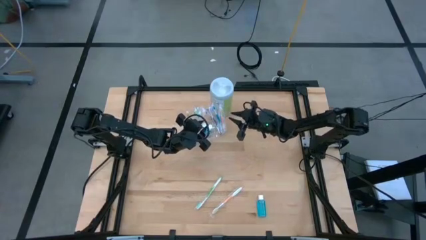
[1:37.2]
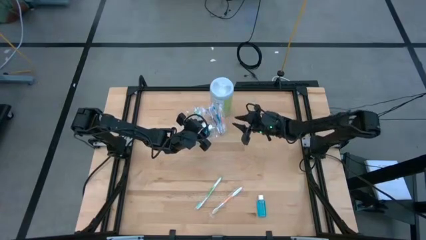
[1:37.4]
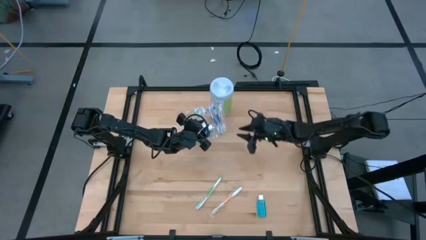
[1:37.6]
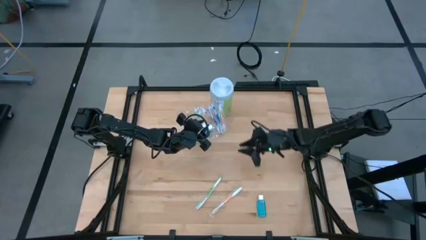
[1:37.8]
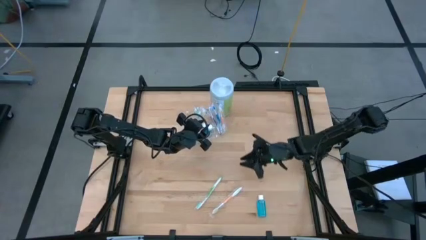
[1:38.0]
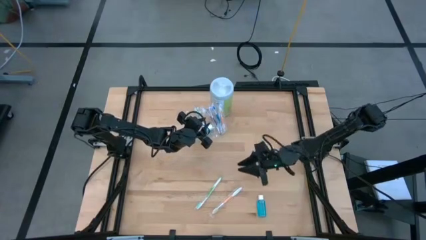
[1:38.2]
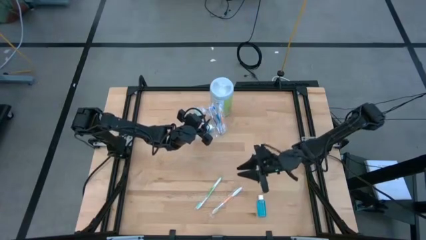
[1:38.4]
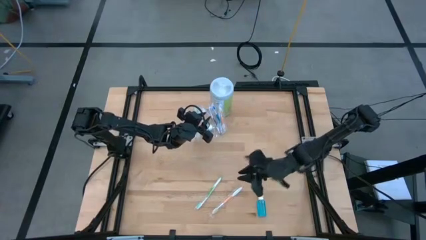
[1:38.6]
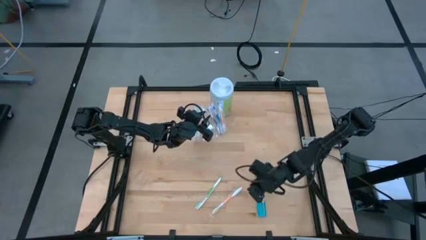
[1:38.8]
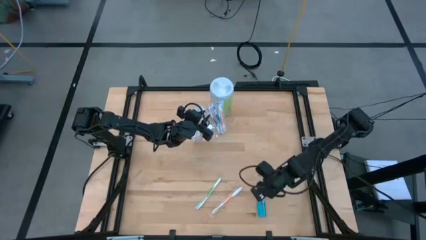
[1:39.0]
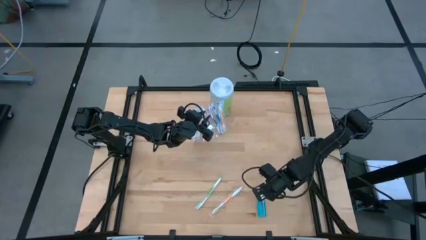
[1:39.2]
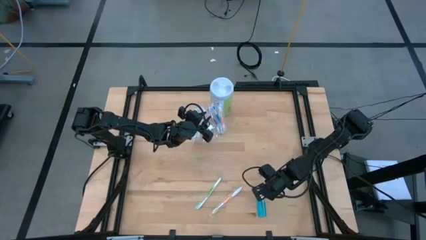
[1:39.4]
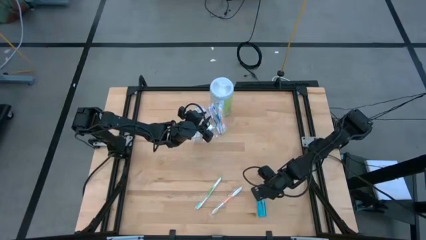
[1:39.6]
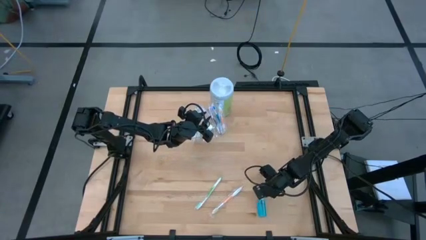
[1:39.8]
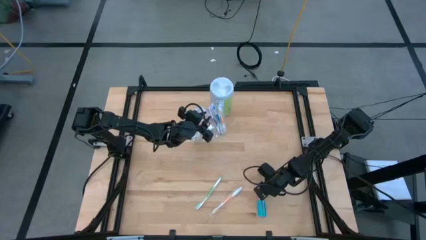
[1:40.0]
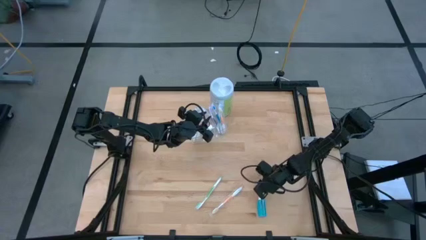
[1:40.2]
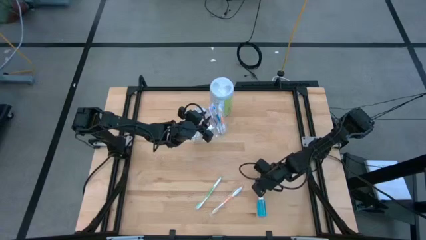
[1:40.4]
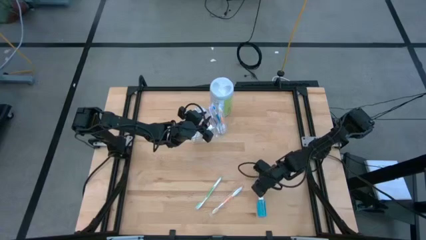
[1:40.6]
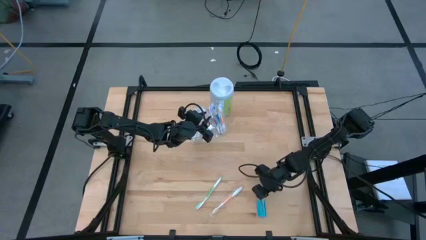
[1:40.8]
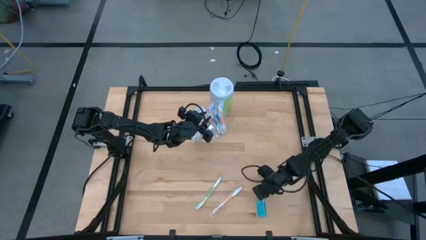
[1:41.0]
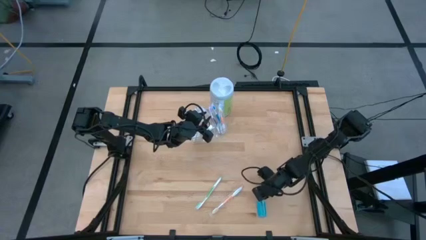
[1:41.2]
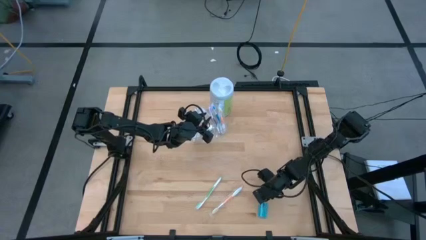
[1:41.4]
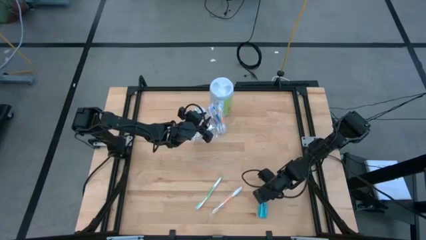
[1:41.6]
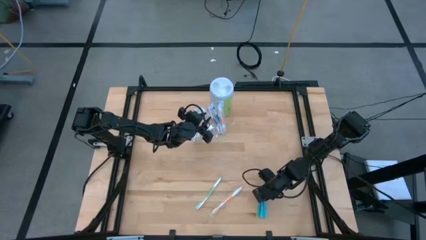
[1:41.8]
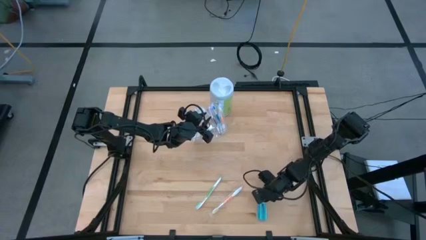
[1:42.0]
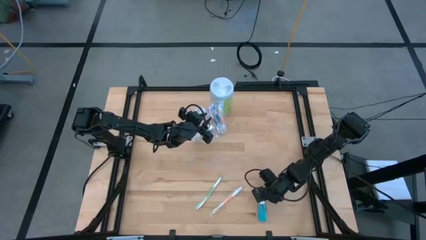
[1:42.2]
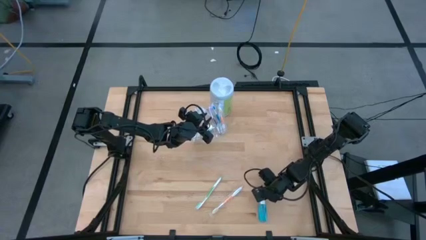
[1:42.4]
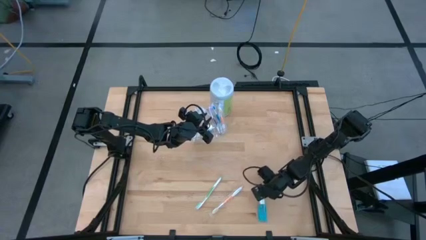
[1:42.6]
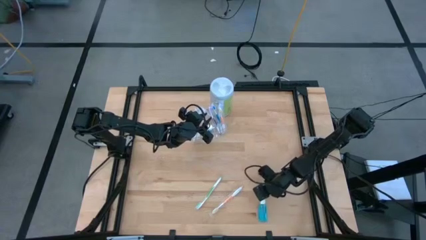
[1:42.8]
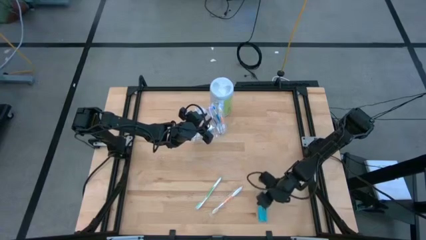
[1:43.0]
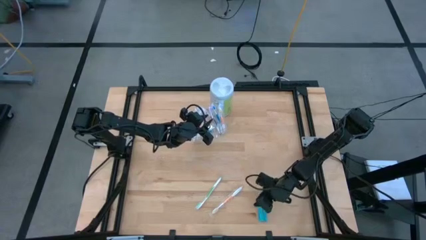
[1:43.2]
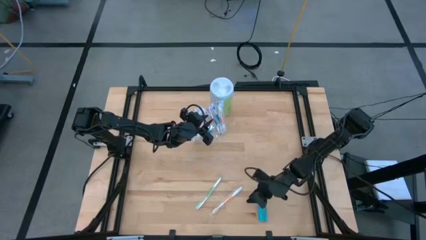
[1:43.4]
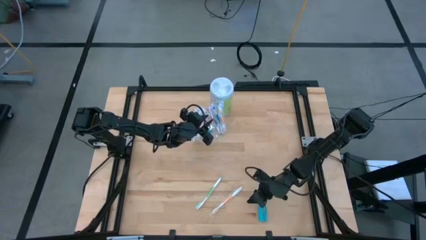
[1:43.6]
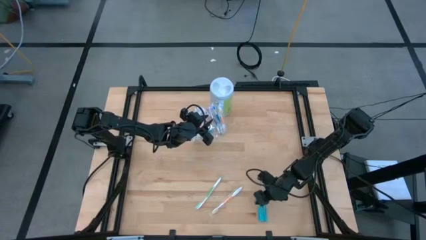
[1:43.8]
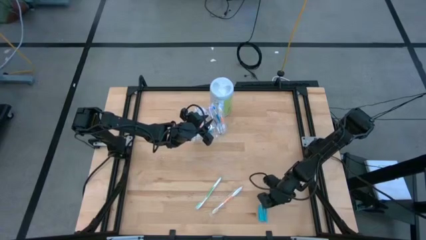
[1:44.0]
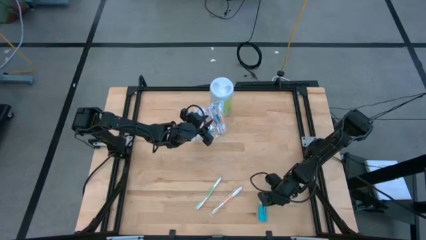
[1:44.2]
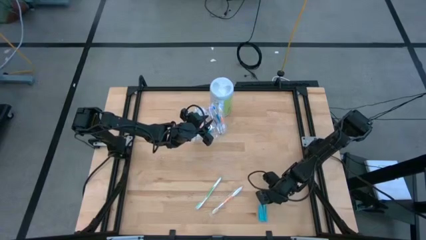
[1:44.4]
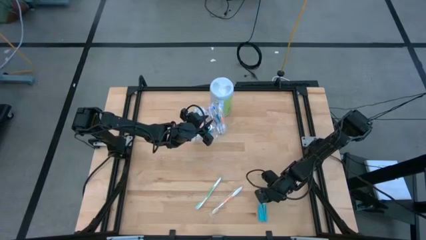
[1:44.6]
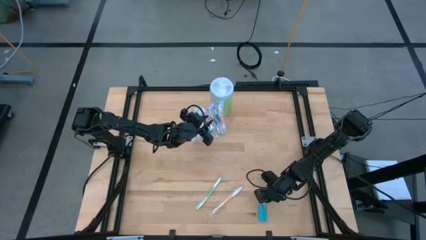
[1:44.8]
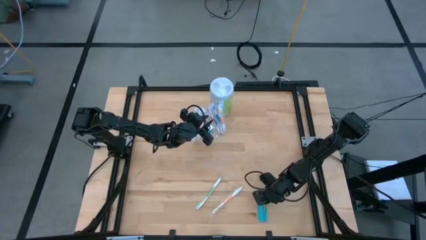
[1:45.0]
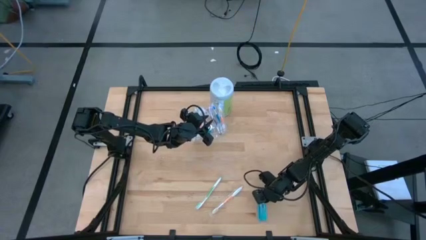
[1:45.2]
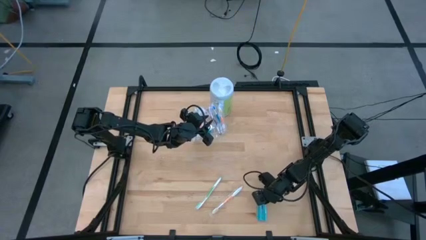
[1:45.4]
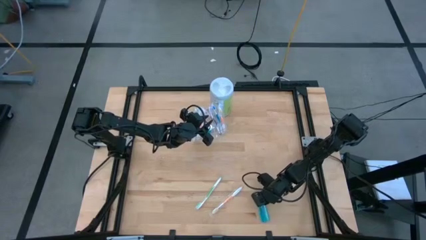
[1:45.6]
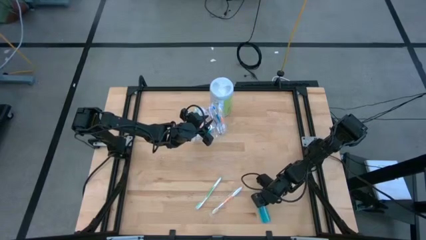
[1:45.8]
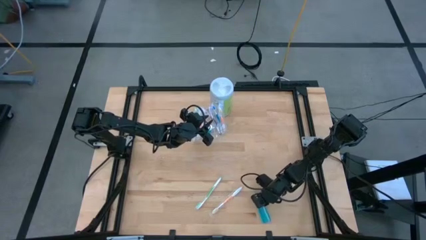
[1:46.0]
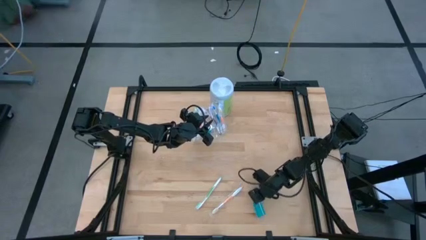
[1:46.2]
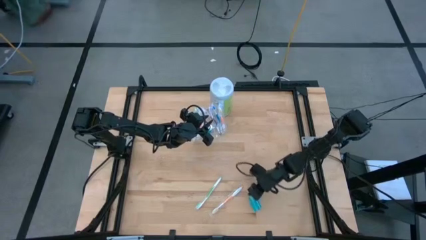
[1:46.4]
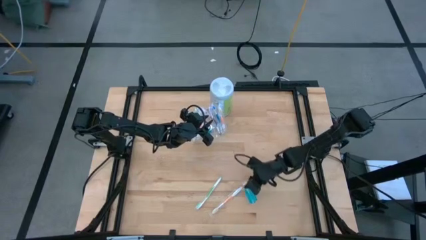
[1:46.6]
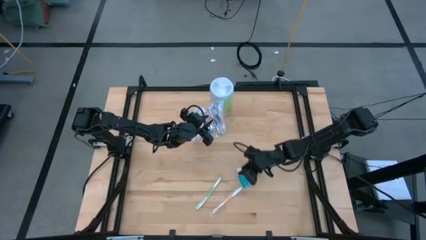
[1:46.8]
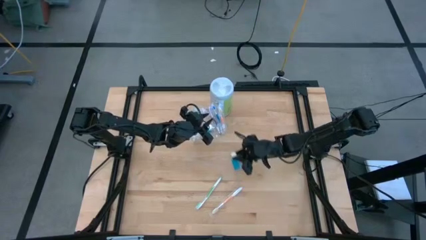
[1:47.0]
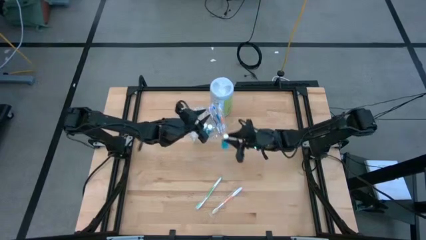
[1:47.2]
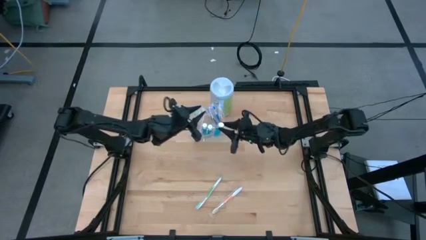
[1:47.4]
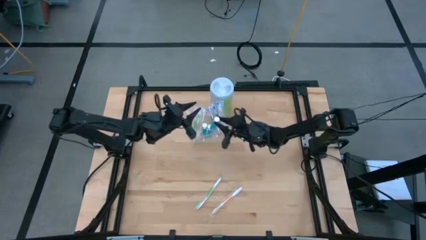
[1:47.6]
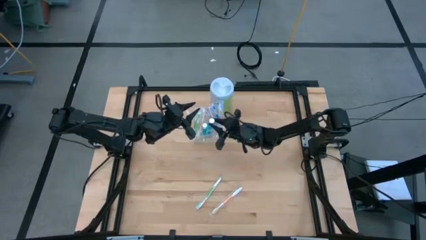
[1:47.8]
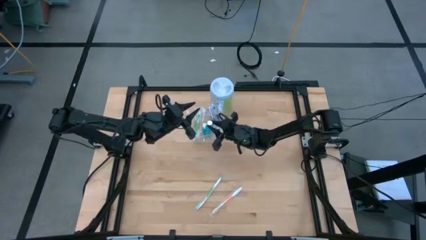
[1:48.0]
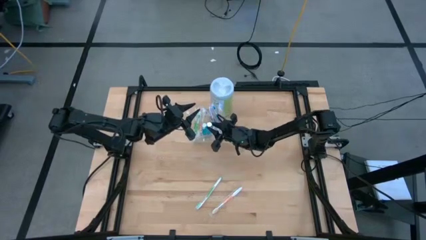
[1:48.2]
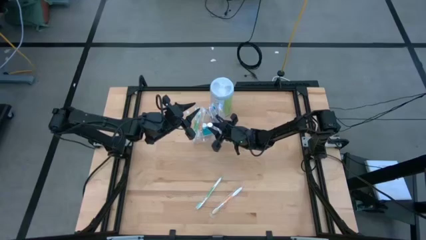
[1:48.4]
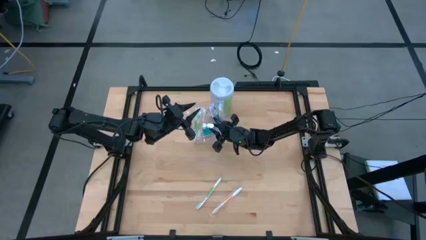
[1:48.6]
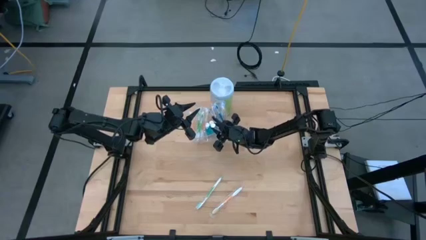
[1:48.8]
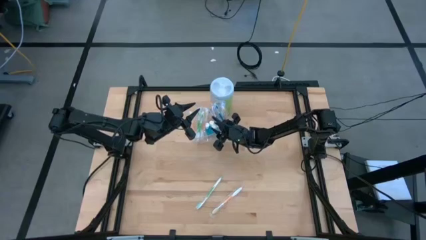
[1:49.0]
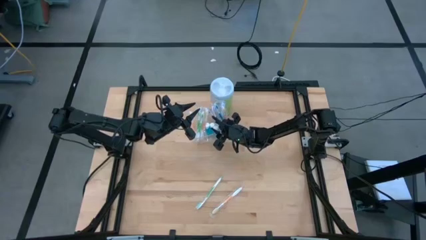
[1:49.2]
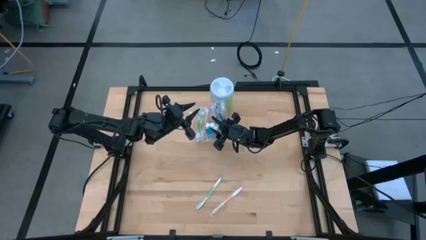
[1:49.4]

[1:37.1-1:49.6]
Task: Pick & Place toothbrushing station
Put the mouthwash bottle into the transparent organizer

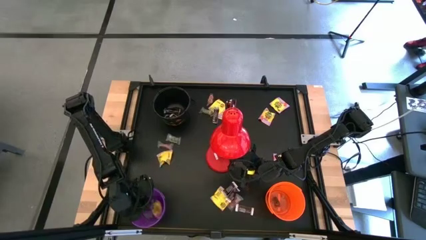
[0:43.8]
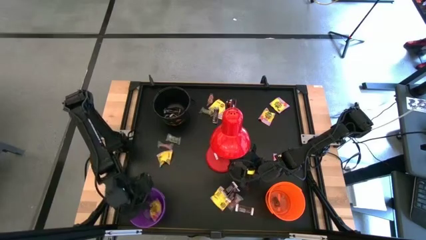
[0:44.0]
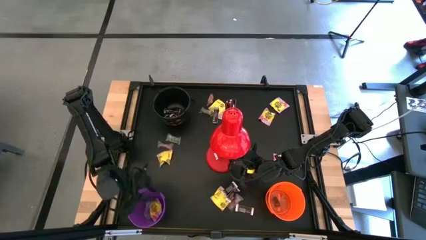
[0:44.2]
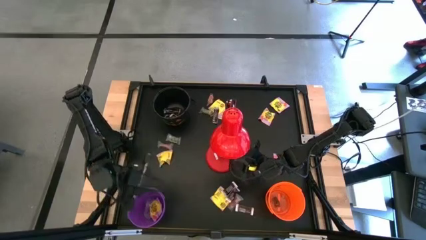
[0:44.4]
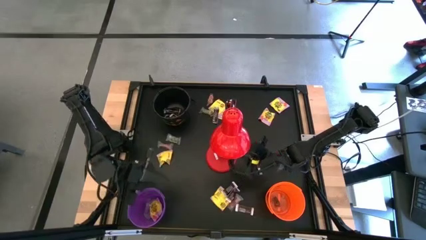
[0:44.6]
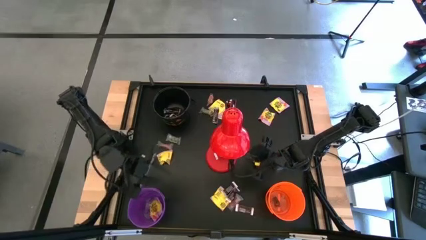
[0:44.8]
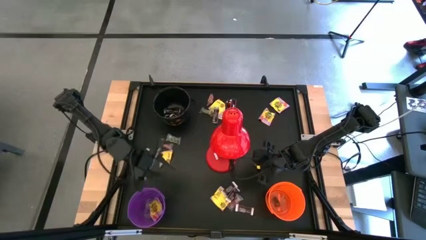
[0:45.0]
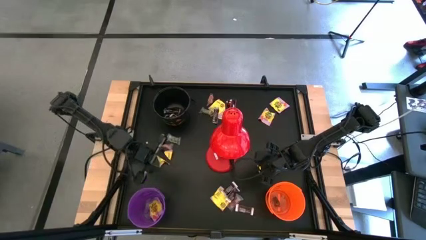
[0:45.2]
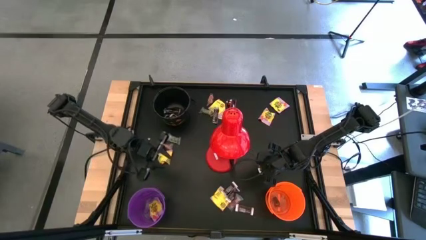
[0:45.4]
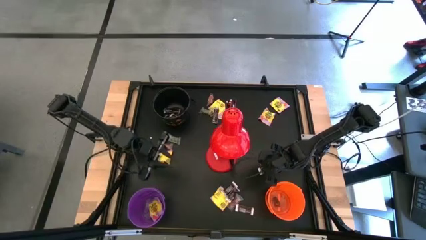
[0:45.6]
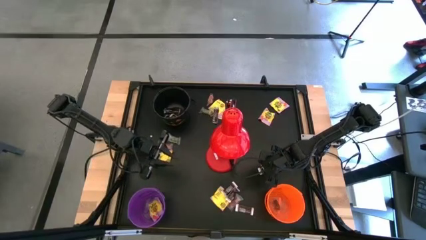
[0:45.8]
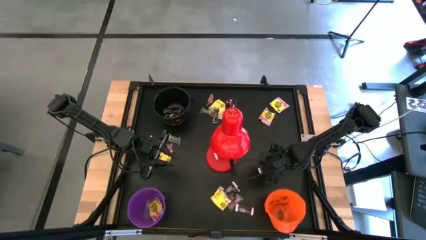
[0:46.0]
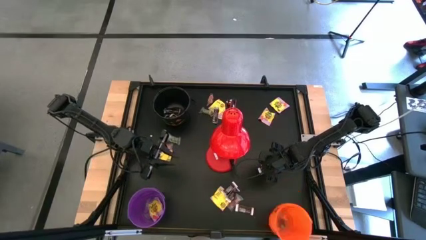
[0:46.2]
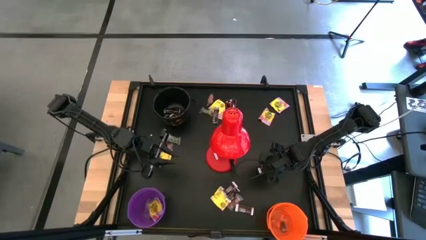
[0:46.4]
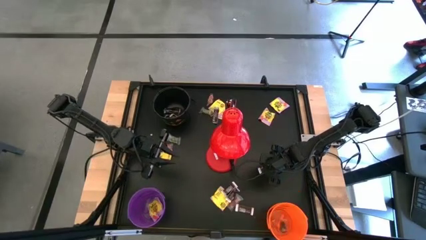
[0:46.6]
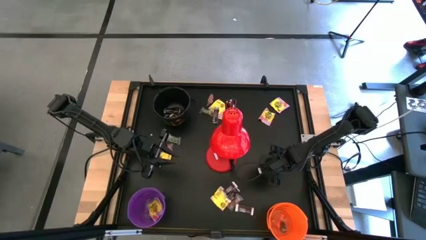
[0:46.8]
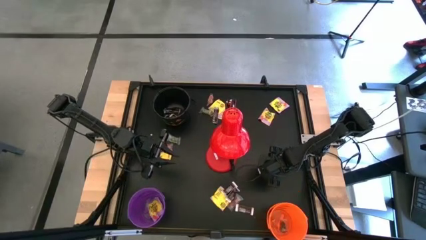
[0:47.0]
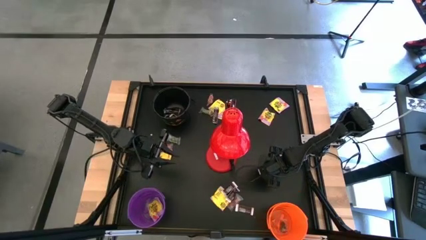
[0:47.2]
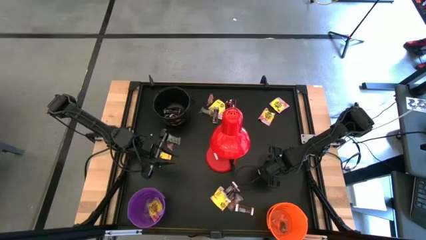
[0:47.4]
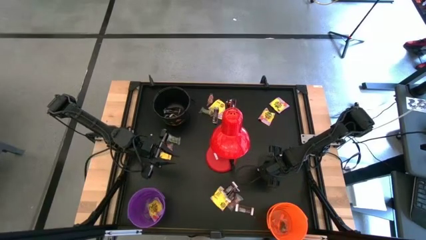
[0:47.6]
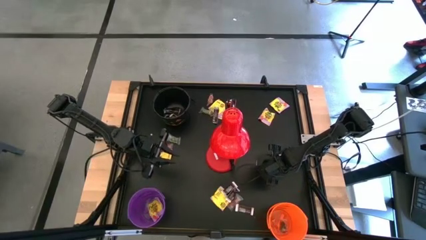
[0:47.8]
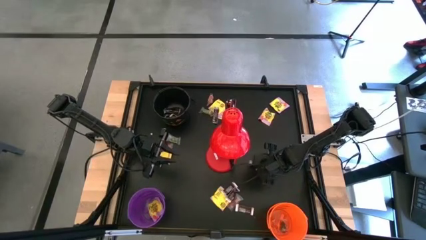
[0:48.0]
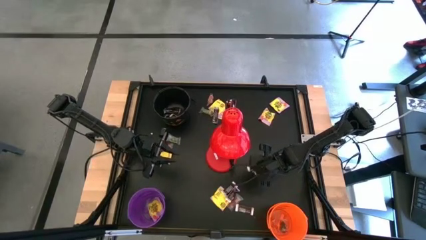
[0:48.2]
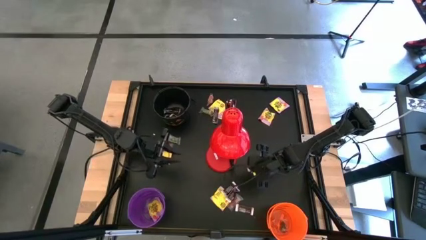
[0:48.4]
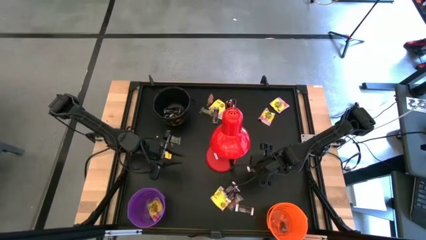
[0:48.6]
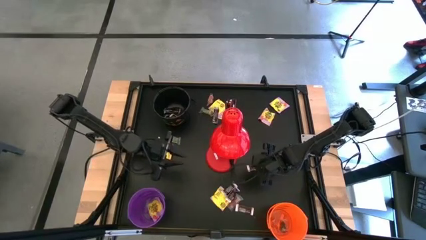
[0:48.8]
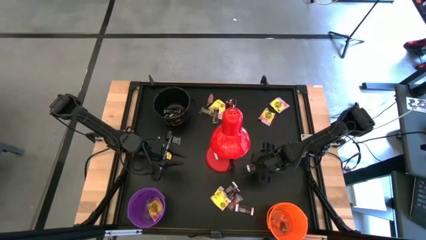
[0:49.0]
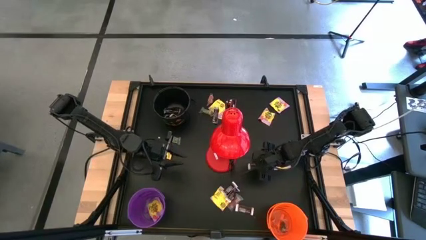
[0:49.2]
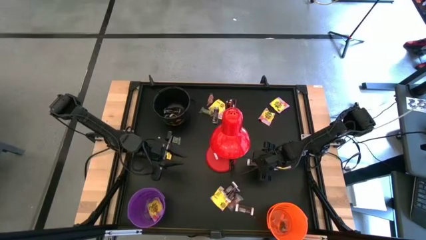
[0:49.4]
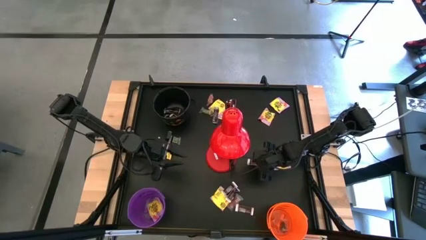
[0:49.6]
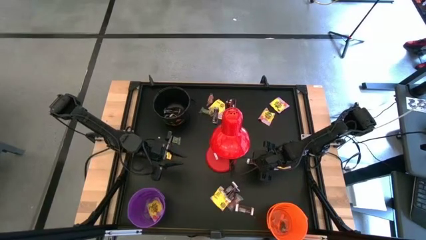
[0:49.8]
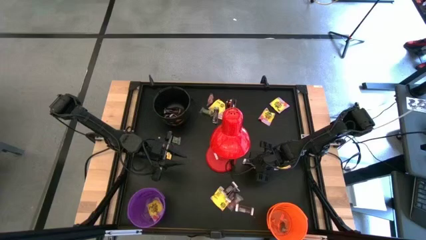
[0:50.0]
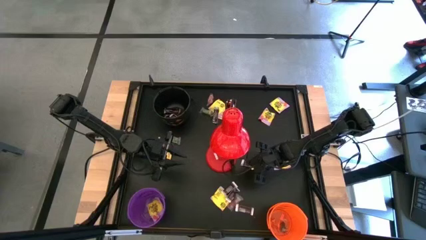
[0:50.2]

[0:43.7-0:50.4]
Task: Organize candy in baskets
Put the brown chocolate bar into the black bucket
